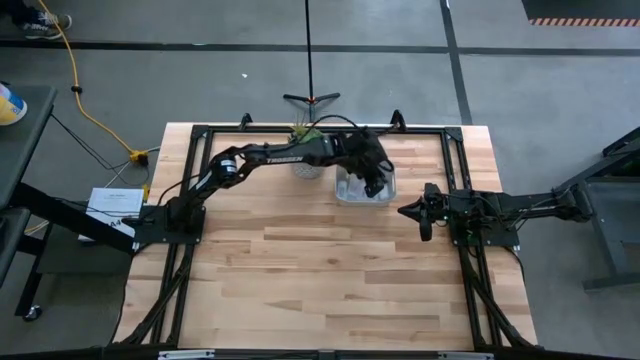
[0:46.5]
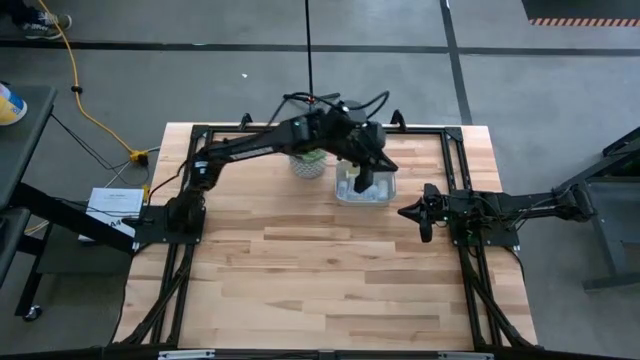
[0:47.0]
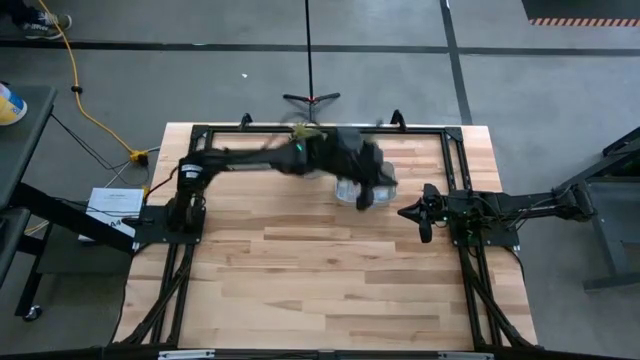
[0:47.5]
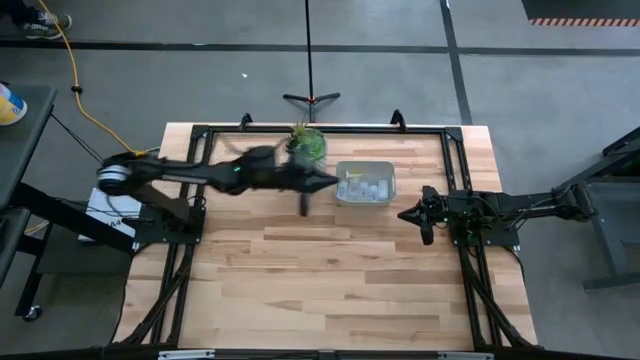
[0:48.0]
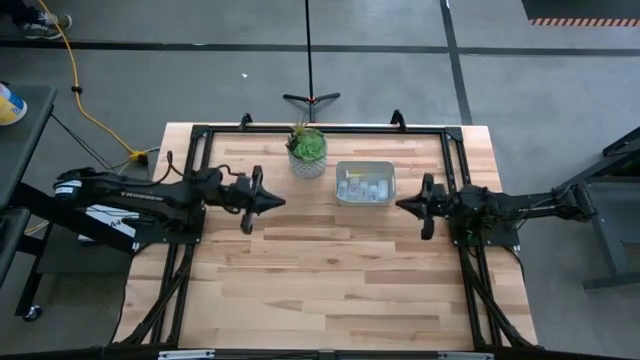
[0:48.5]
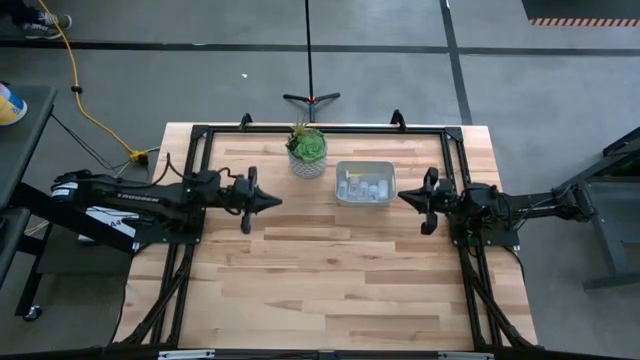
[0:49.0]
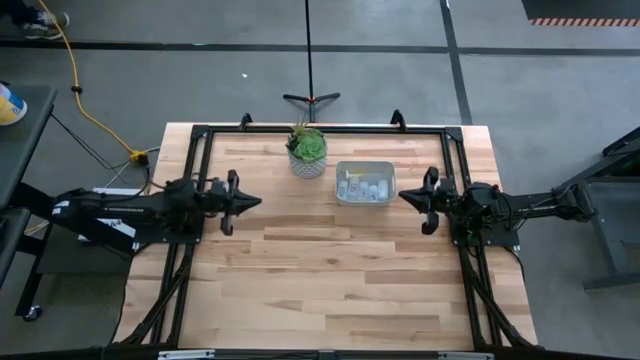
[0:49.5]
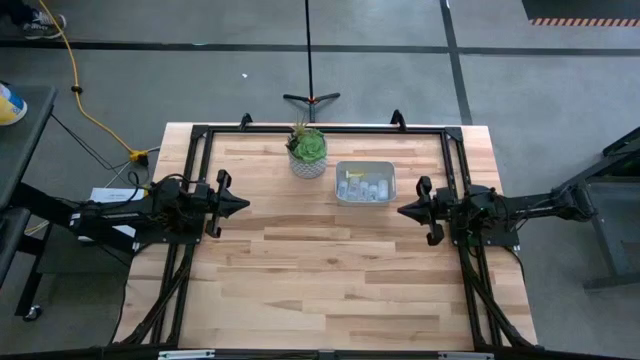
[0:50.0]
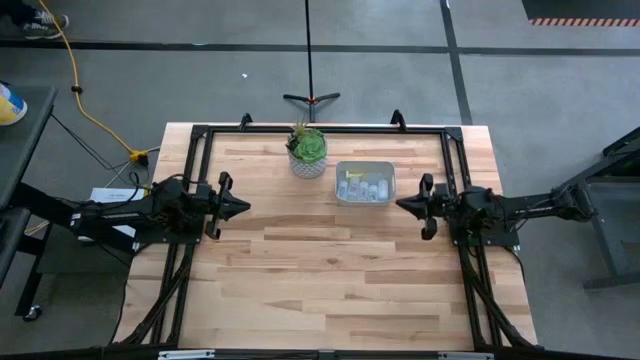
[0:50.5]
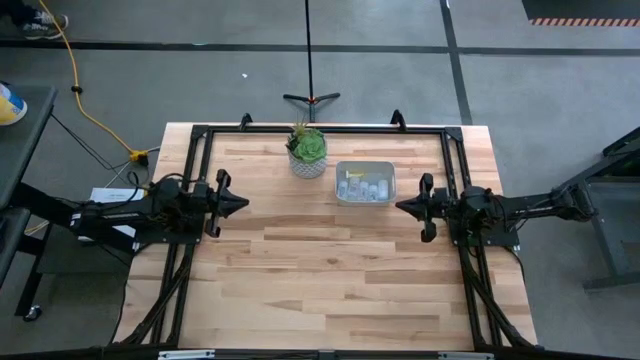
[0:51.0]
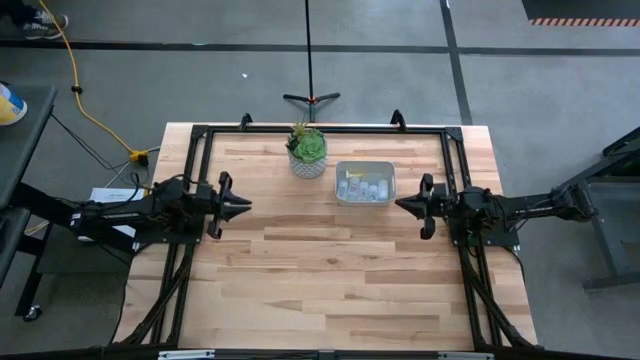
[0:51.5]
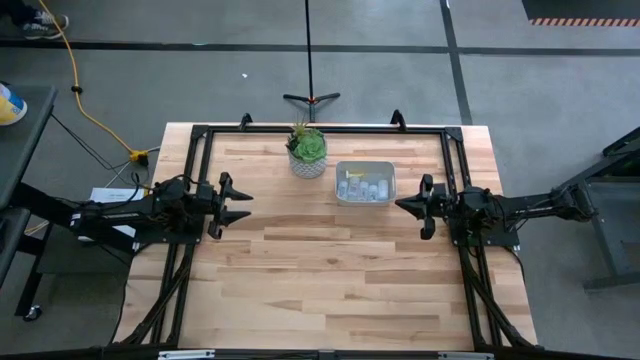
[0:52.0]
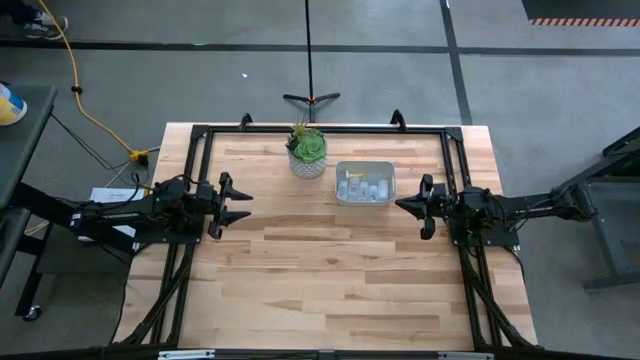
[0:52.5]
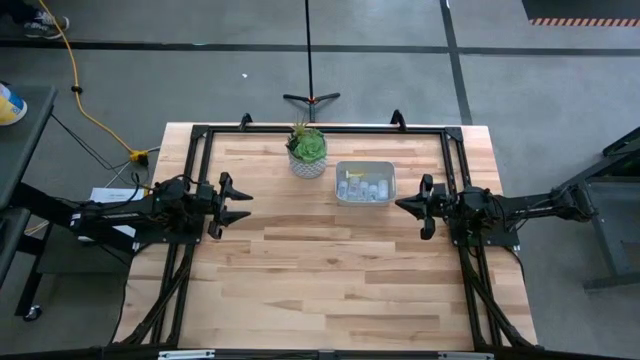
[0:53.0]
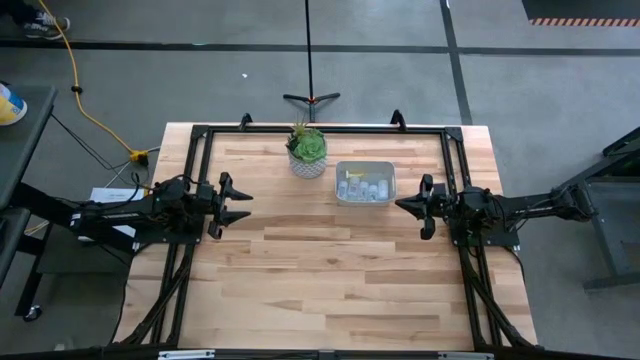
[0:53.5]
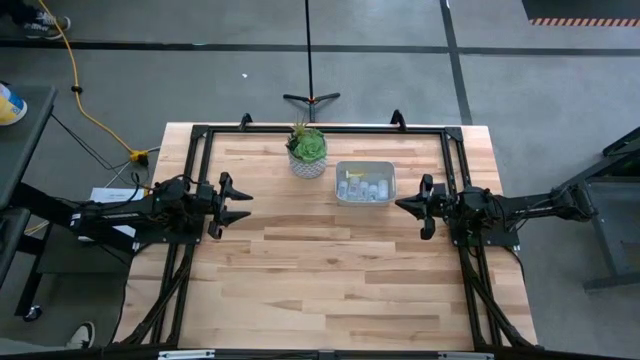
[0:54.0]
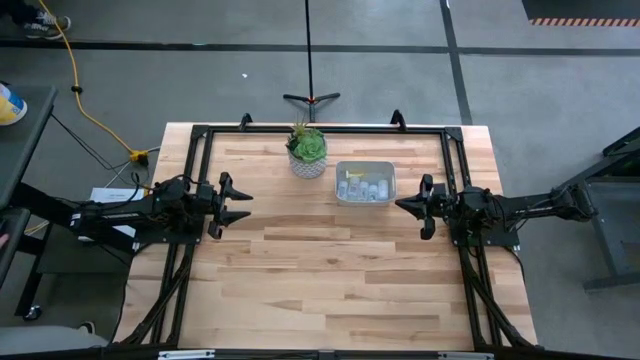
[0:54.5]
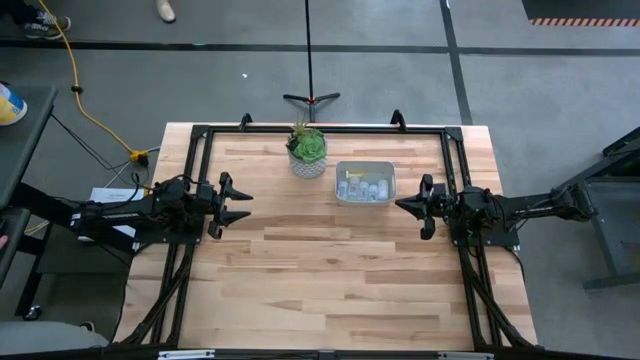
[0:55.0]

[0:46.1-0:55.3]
Task: Pick and place pill bottles into a basket
Return to Home Position

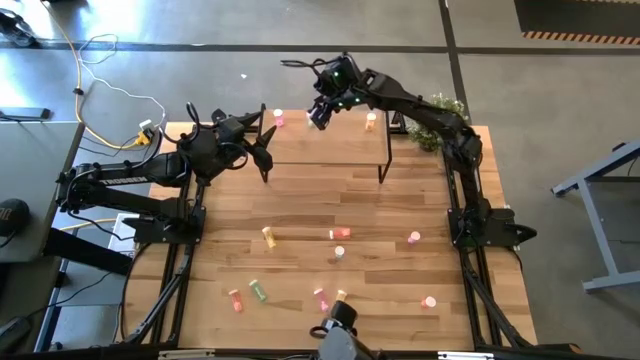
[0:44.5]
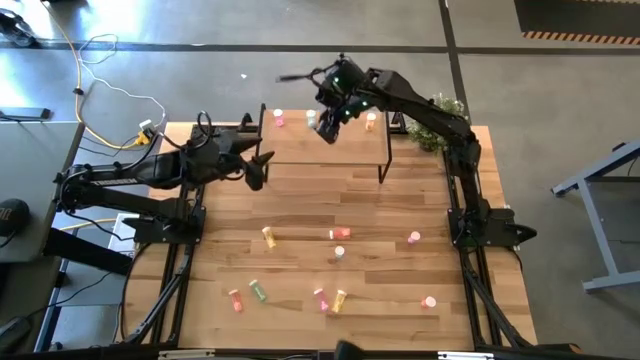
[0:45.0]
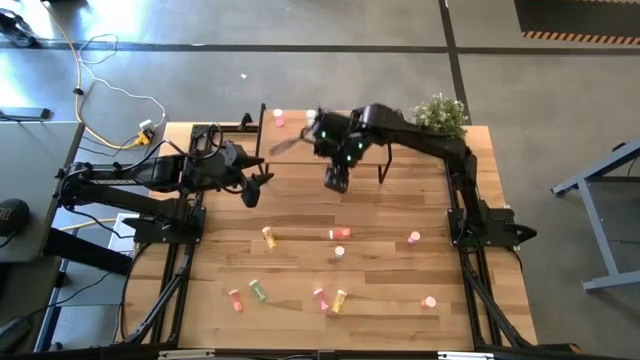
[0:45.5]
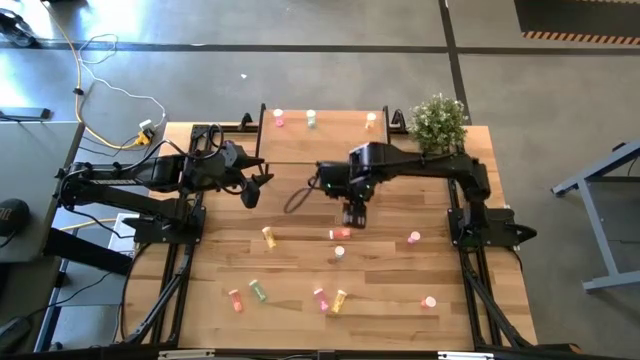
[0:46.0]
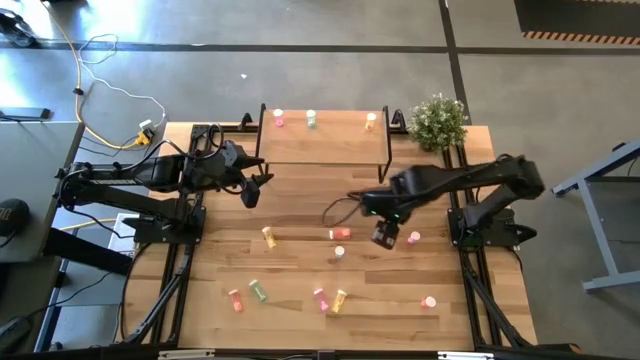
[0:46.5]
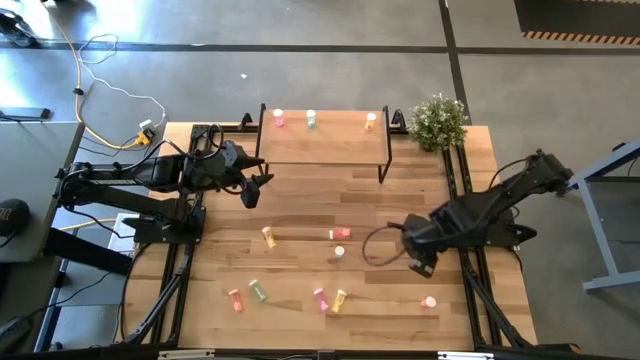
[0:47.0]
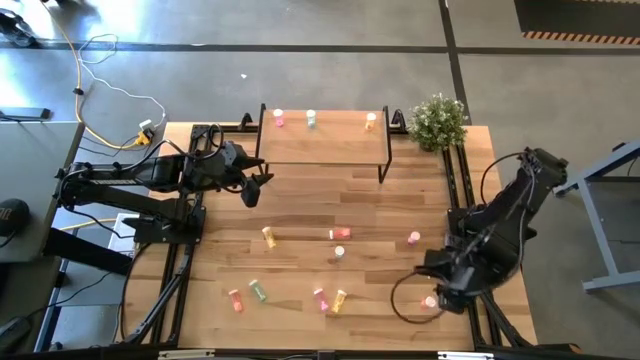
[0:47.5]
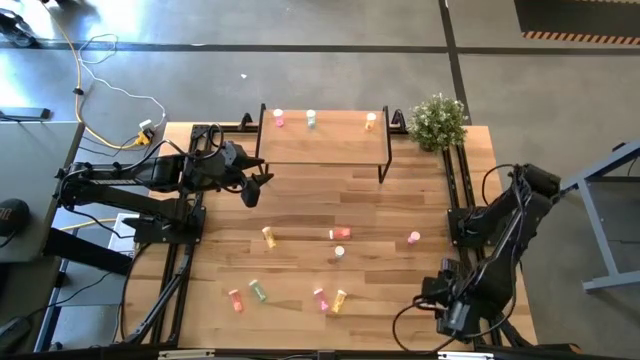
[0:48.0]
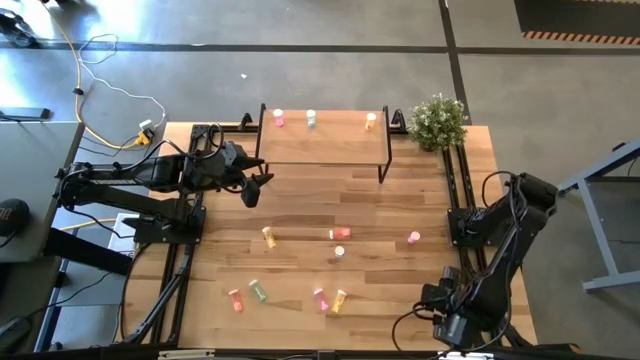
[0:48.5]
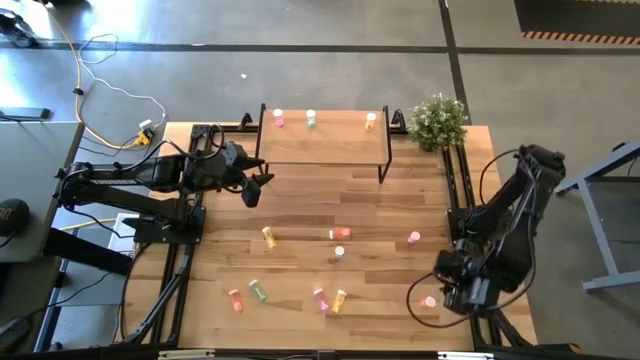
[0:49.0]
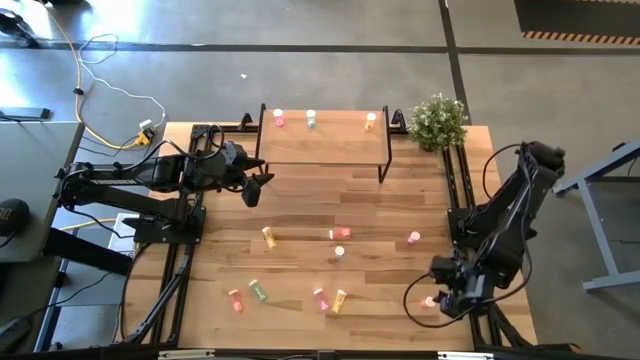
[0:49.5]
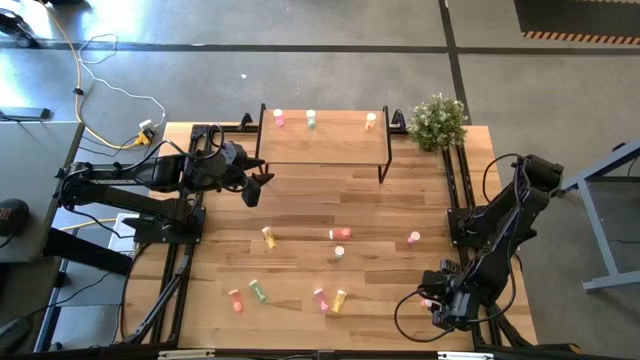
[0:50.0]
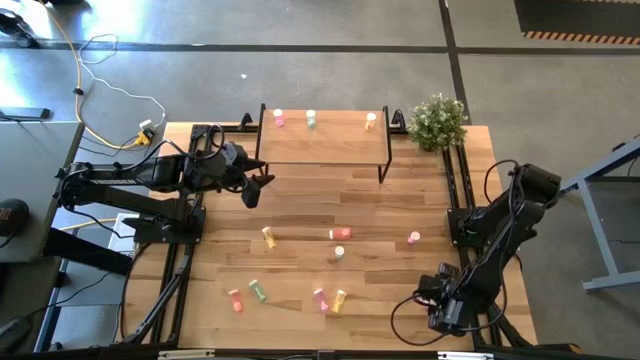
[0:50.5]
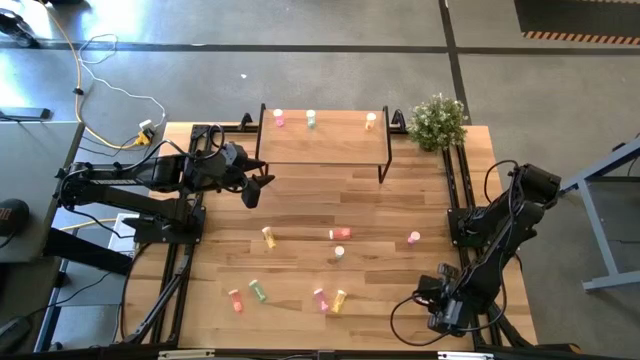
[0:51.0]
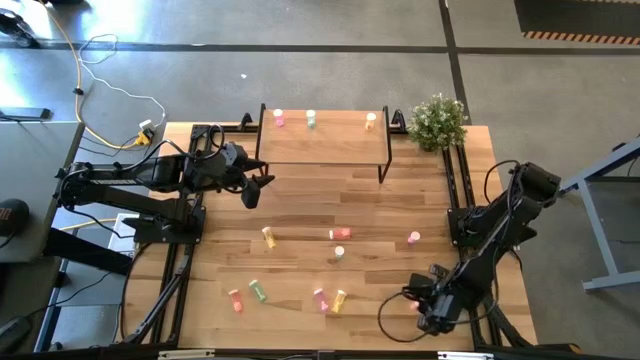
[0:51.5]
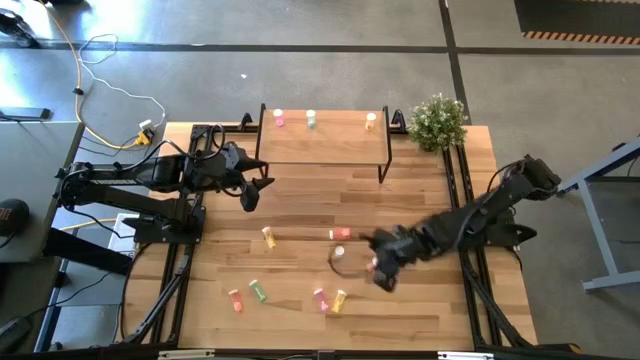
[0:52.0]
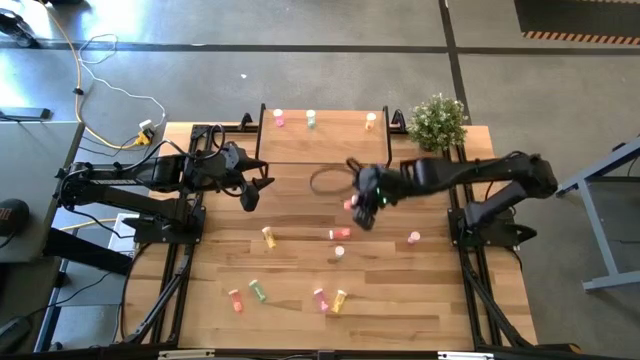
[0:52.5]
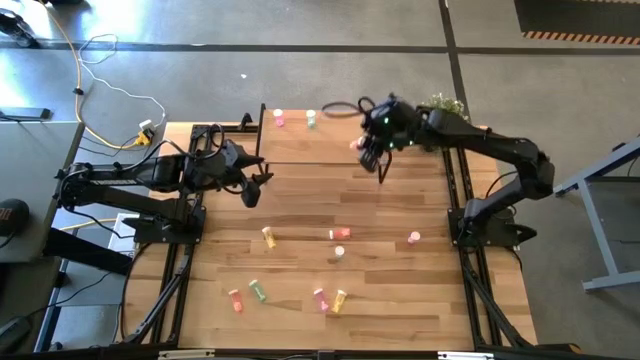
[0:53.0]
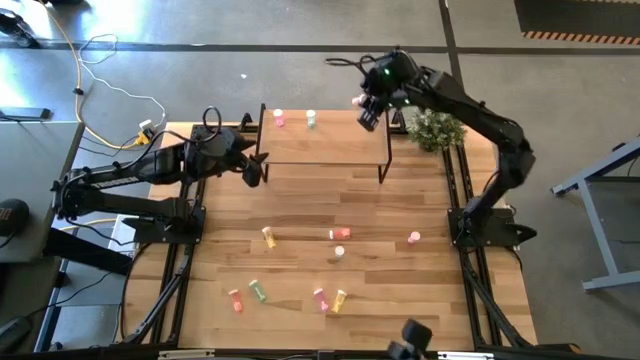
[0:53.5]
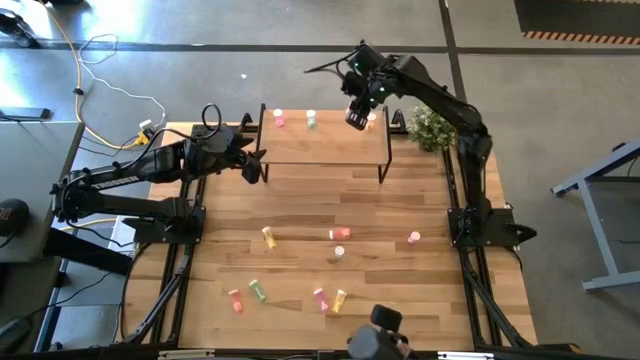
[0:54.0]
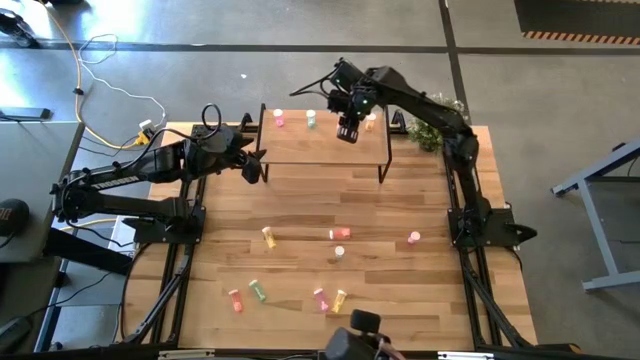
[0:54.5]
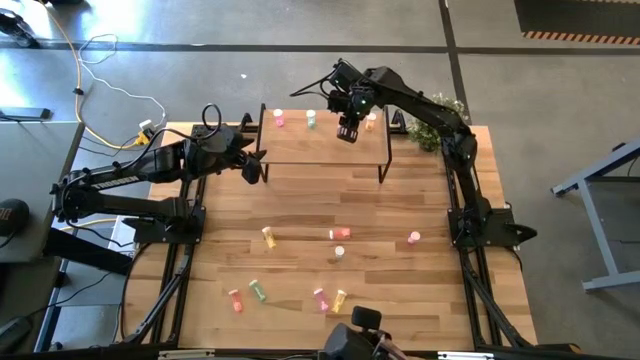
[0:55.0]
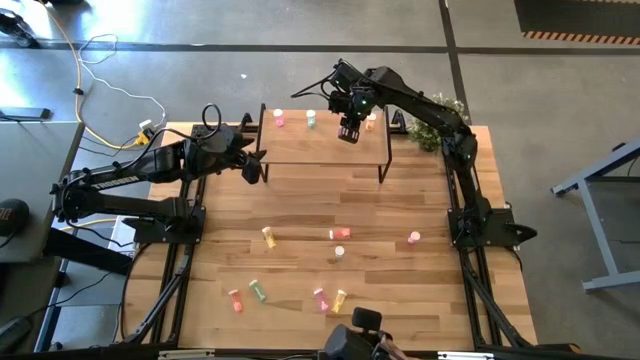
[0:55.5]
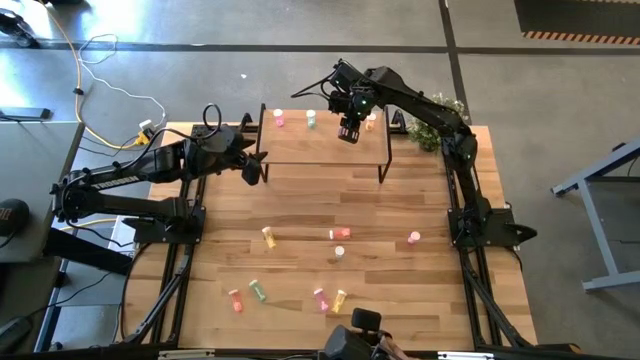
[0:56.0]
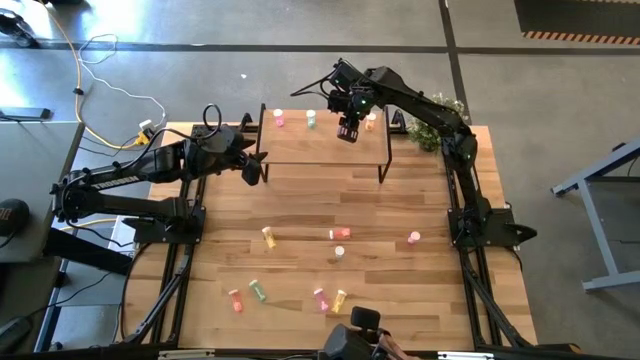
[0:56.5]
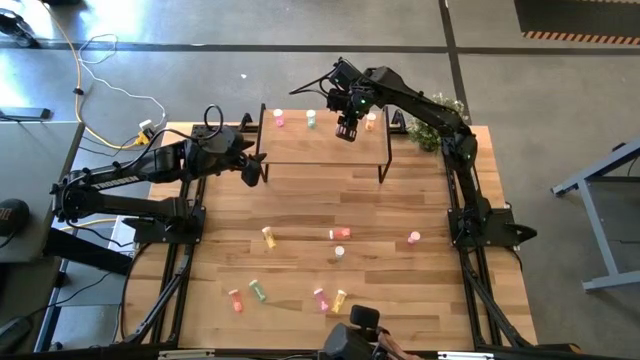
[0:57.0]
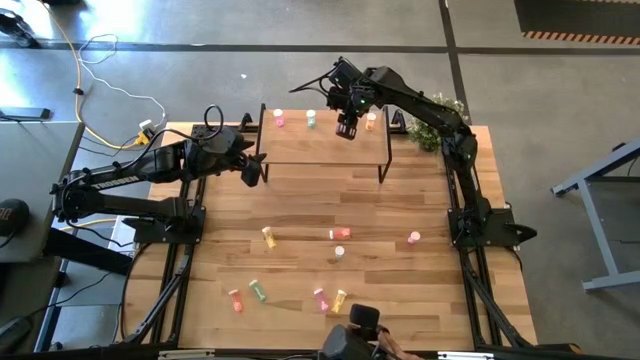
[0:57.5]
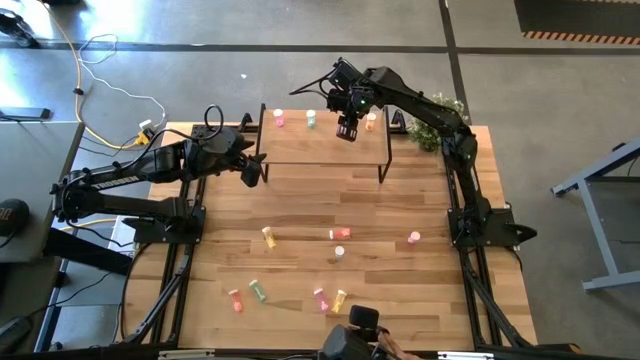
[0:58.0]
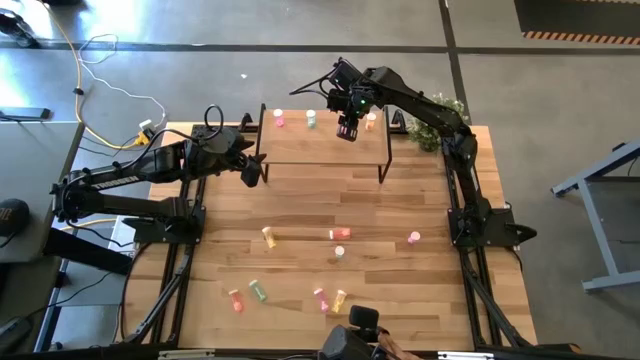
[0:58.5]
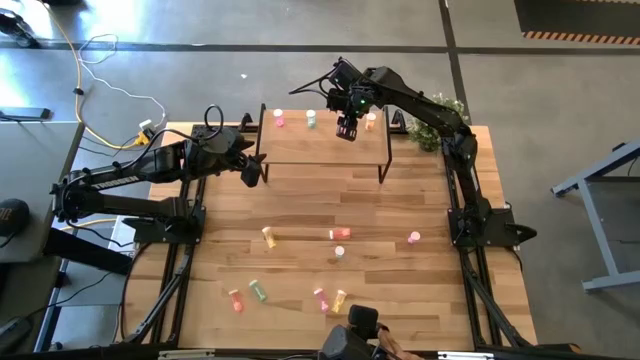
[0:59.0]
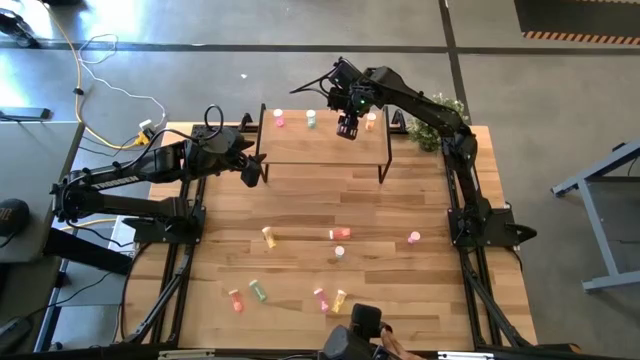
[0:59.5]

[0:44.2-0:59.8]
Task: Pick and place medicine bottles onto shelf by color
Put the bottom right orange pill bottle on the shelf
